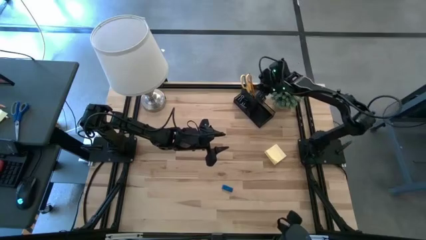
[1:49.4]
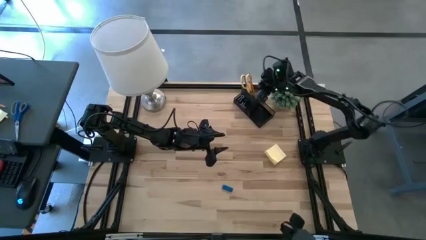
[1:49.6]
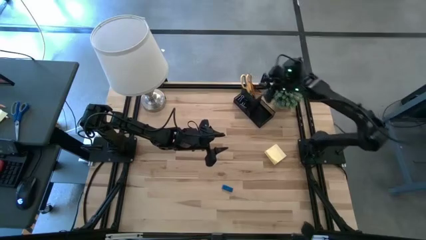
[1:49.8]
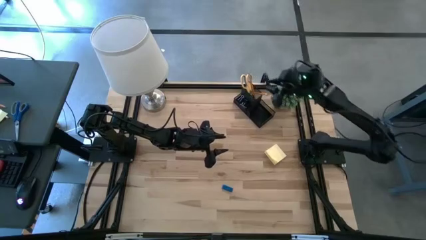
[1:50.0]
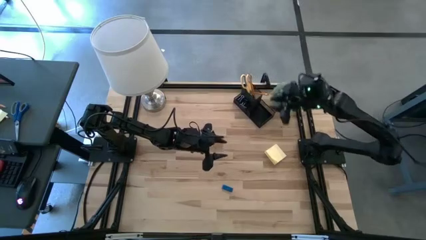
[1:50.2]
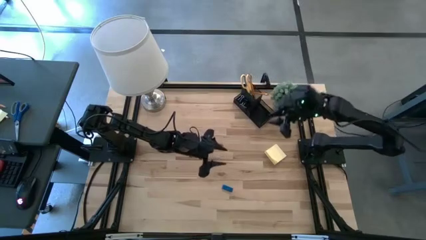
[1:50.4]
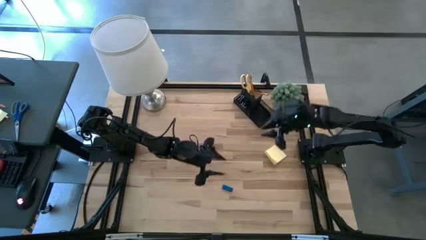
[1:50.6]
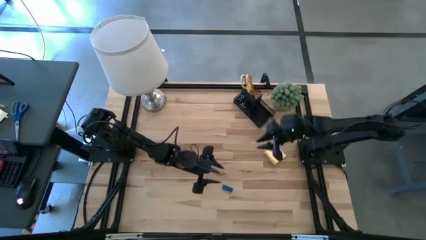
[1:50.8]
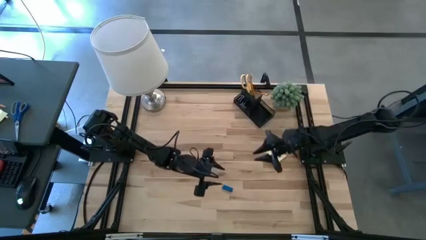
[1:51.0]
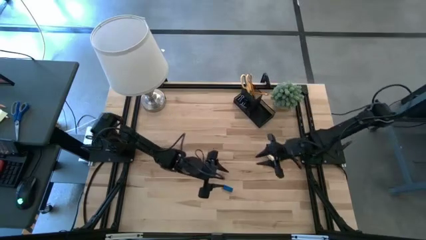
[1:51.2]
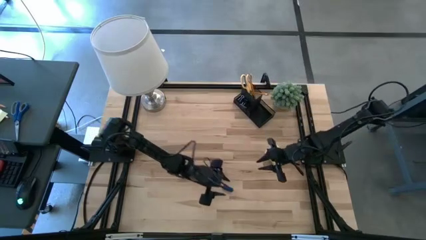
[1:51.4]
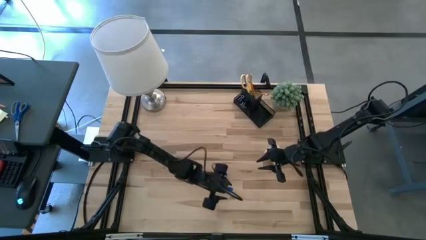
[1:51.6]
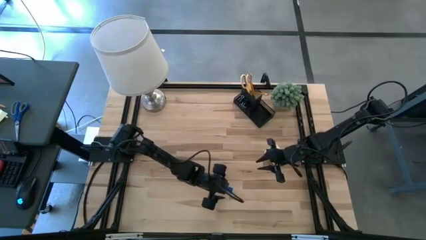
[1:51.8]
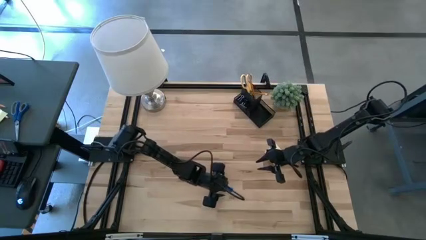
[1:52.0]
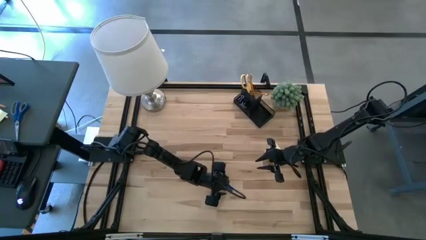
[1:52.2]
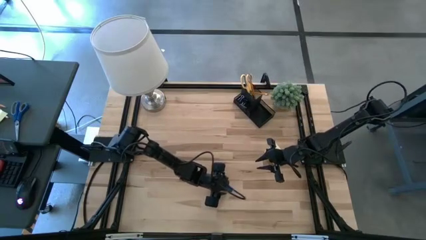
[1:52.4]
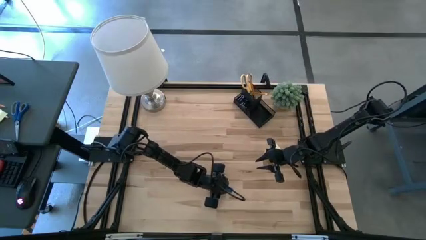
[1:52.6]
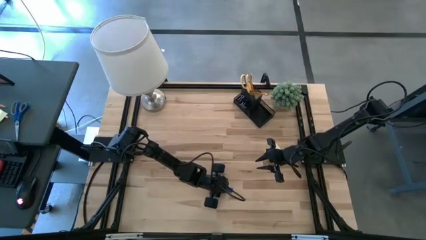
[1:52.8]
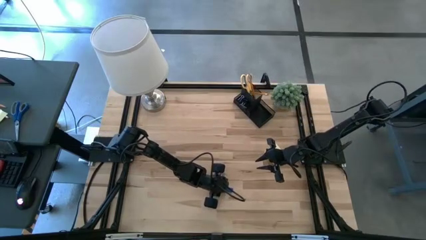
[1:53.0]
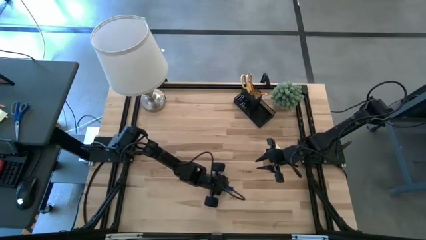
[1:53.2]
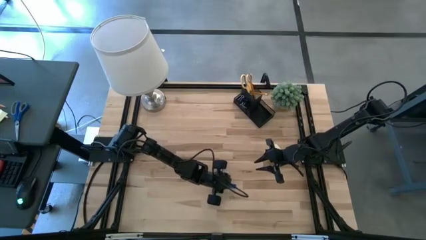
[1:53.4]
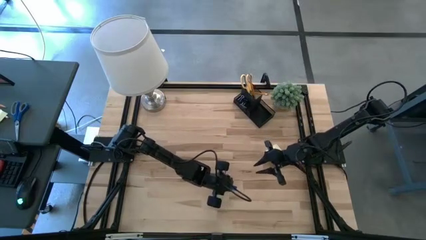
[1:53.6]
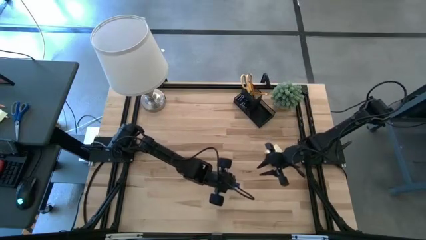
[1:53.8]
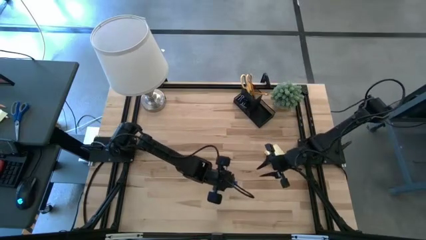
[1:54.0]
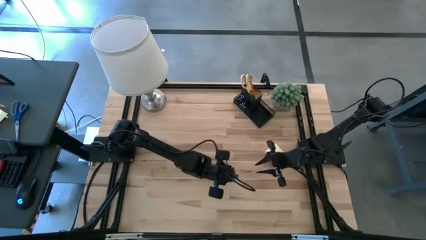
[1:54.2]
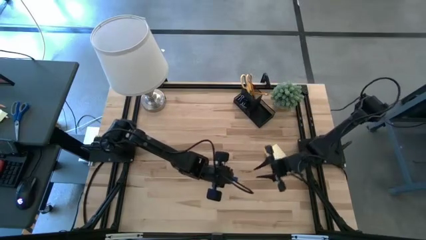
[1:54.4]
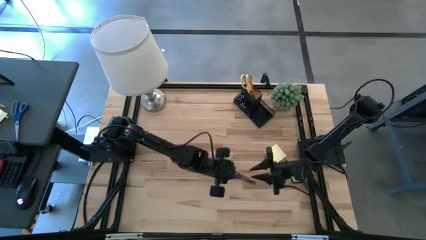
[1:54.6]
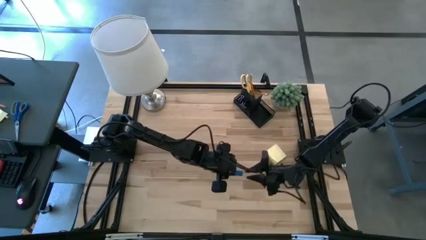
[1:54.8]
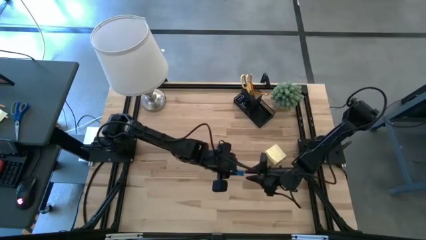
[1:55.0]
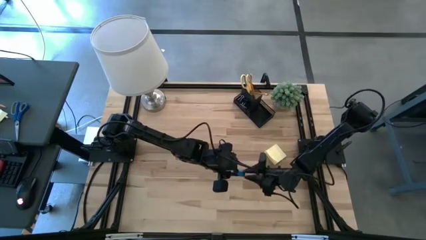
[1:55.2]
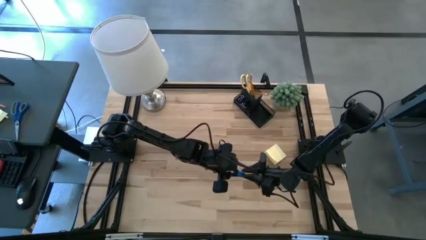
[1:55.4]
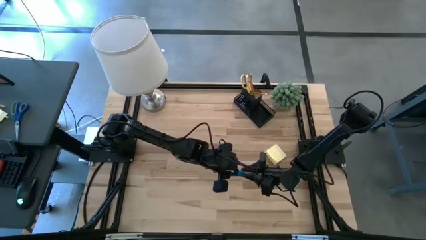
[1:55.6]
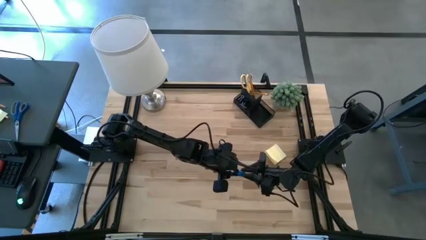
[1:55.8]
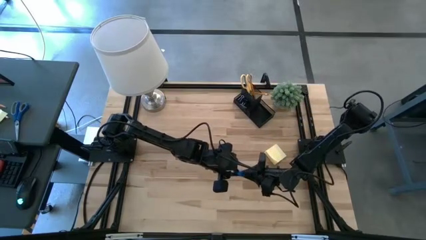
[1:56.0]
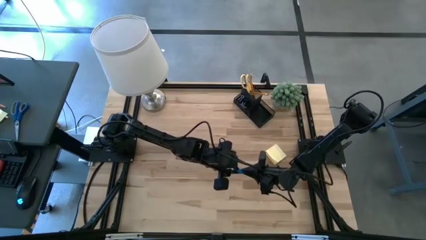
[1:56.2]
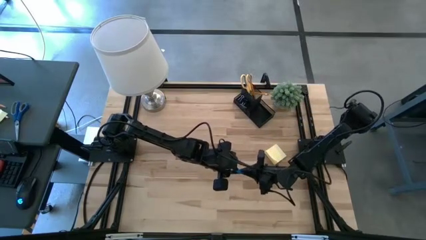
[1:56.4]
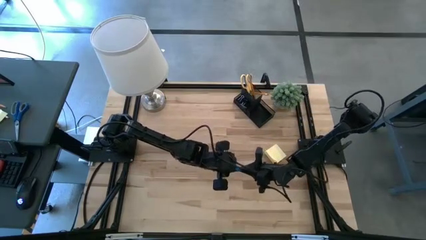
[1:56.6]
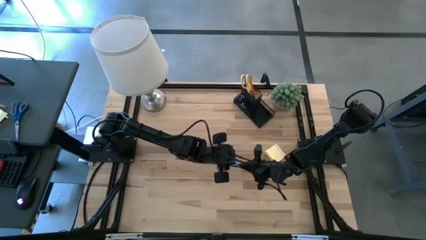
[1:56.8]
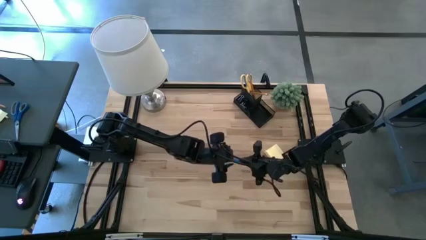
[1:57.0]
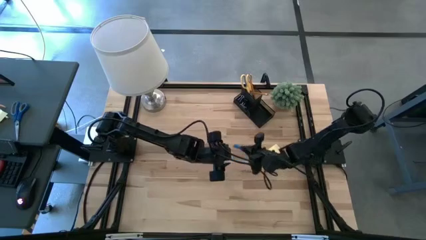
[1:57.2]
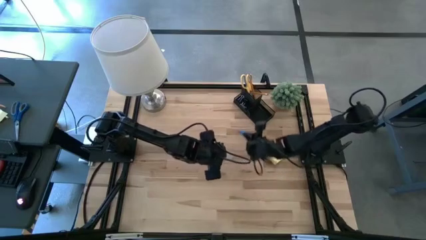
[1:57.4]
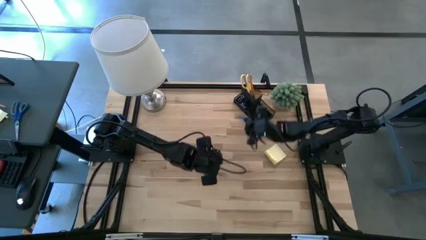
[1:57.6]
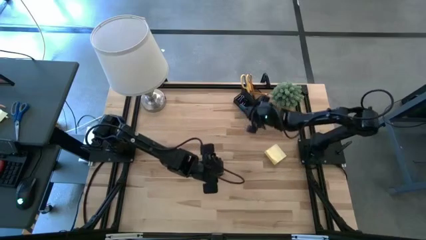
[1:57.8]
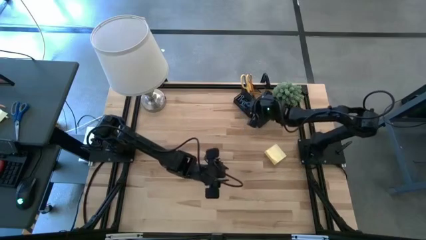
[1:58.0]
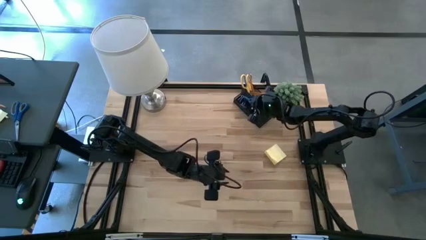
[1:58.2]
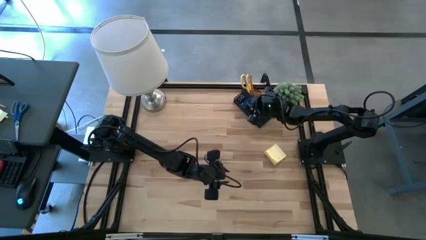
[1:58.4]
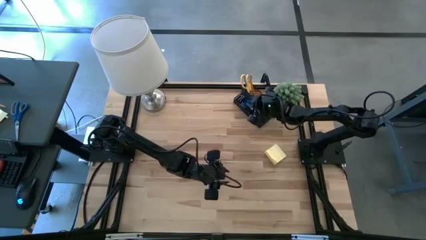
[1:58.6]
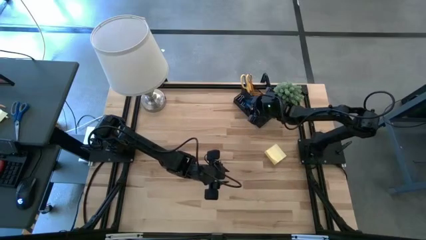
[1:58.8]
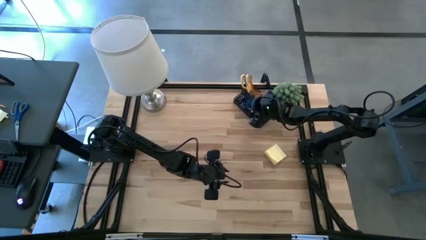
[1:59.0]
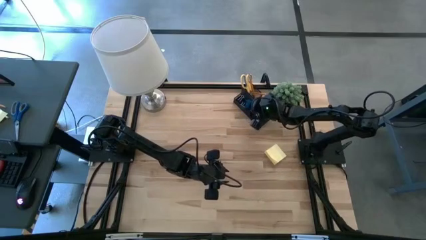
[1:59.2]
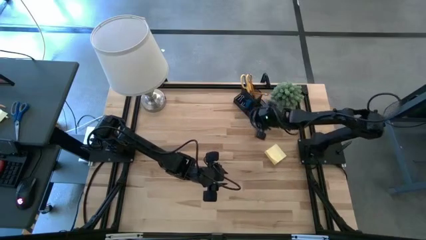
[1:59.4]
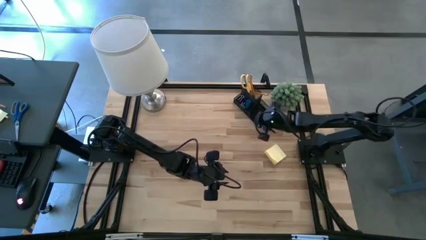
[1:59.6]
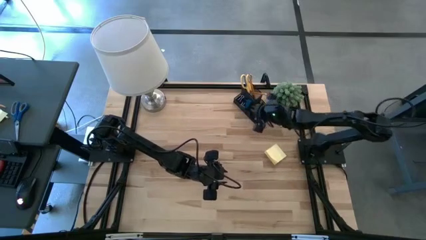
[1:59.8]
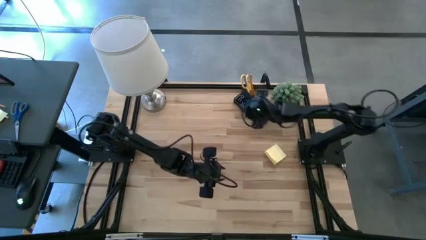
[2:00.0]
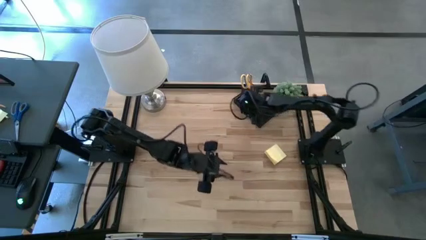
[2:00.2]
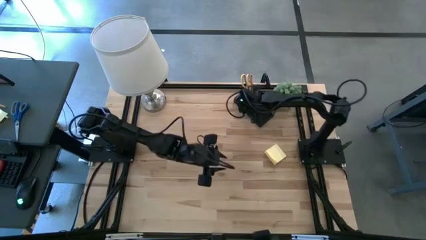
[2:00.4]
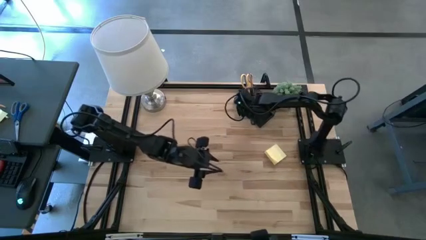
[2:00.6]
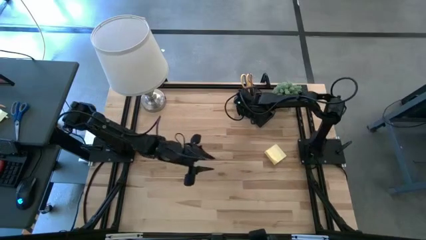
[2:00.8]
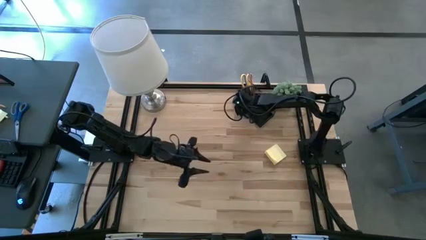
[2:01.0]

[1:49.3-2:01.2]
Task: Pick and place office supplies into organizer
Put the blue eraser into the desk organizer

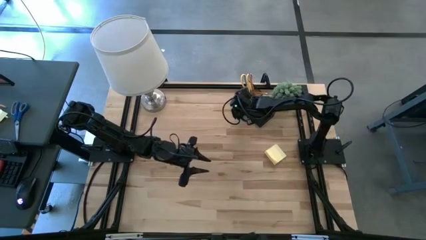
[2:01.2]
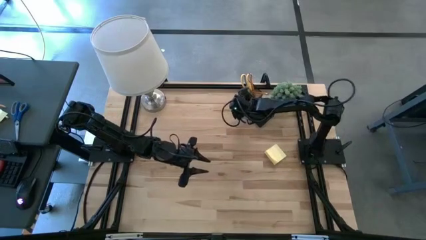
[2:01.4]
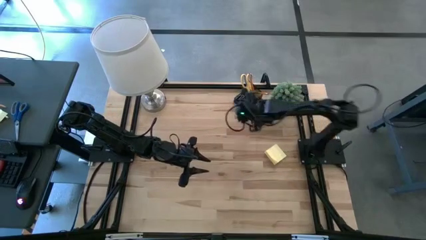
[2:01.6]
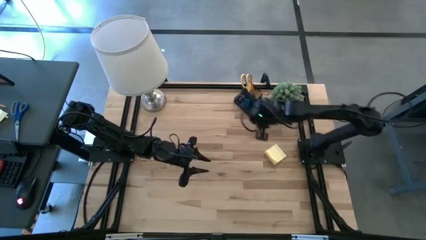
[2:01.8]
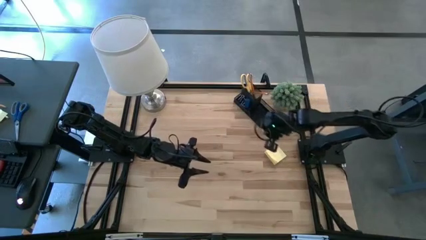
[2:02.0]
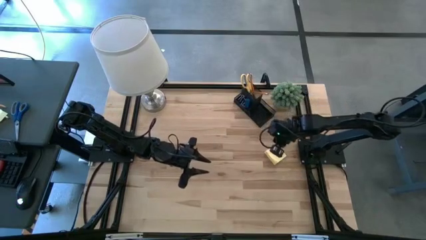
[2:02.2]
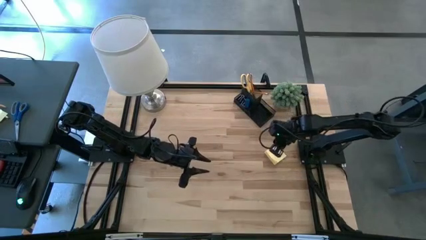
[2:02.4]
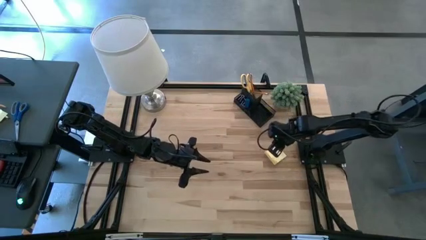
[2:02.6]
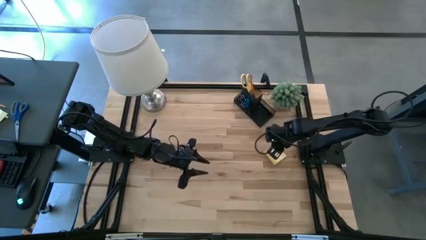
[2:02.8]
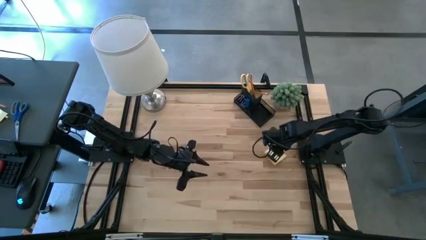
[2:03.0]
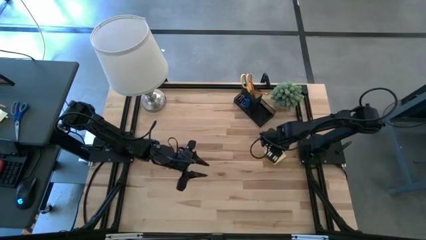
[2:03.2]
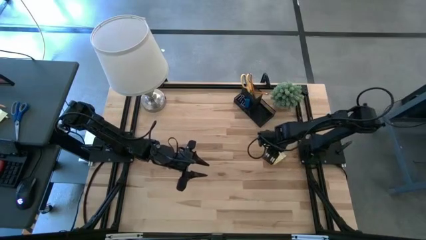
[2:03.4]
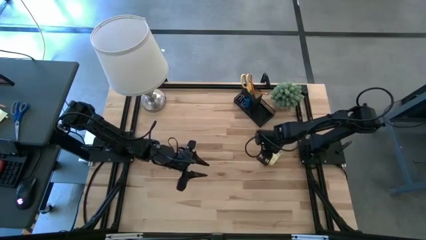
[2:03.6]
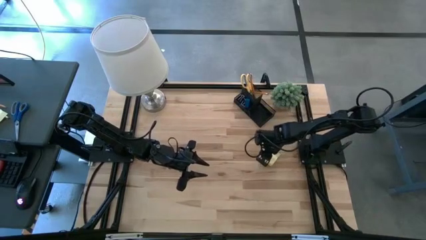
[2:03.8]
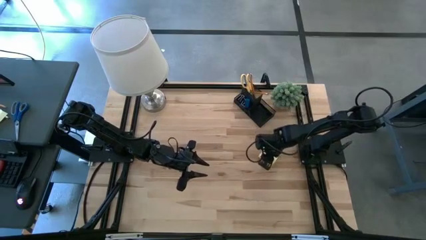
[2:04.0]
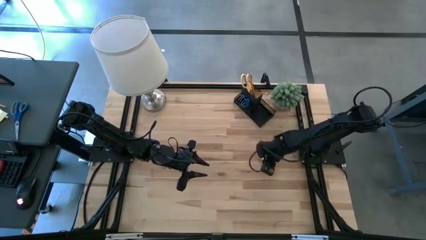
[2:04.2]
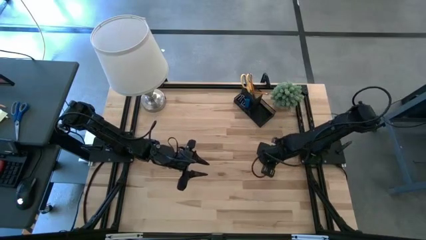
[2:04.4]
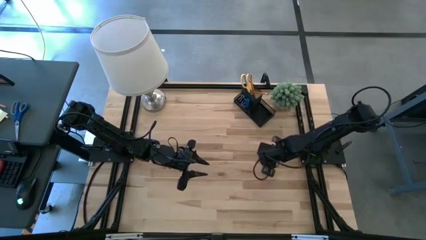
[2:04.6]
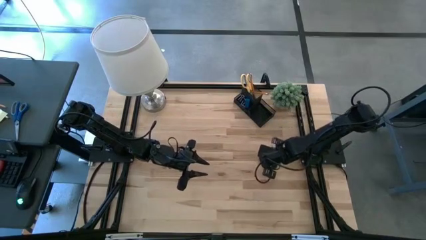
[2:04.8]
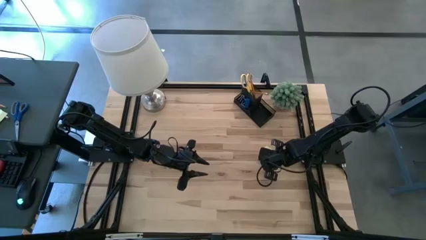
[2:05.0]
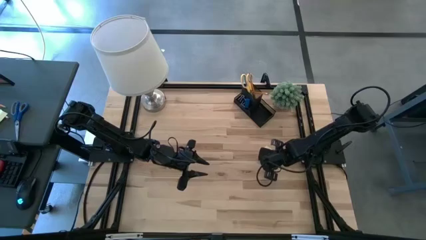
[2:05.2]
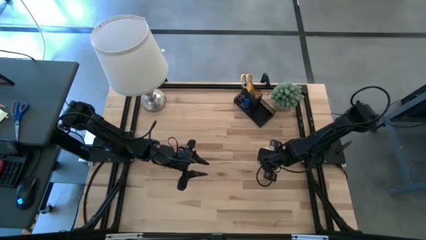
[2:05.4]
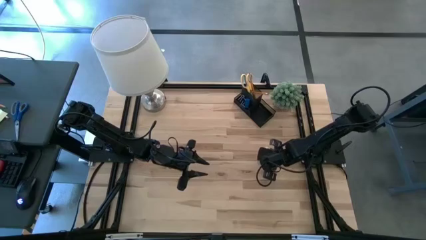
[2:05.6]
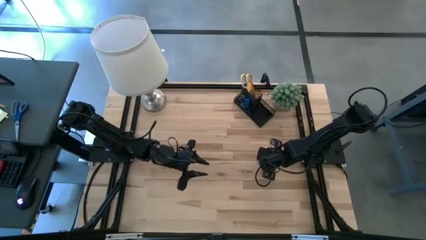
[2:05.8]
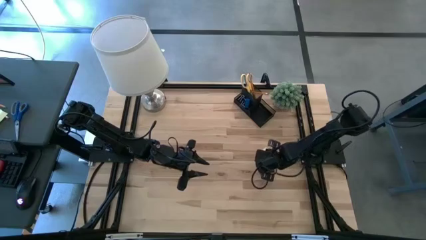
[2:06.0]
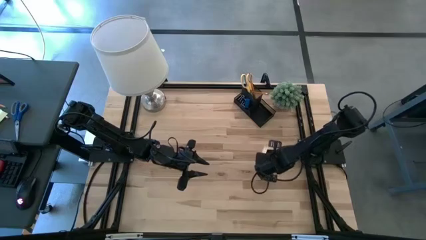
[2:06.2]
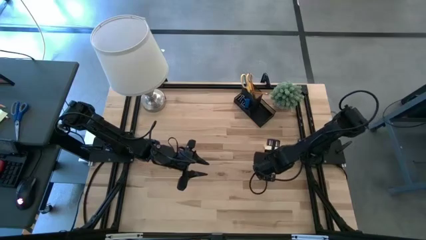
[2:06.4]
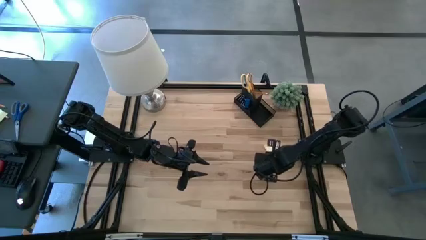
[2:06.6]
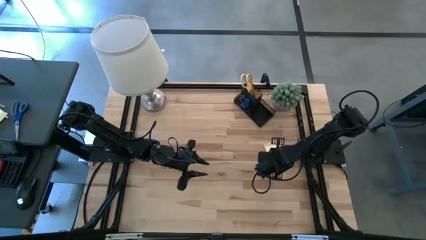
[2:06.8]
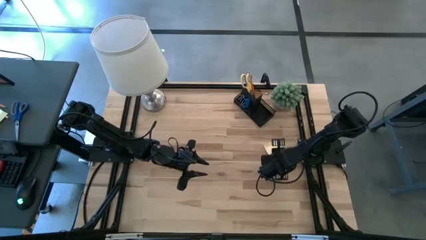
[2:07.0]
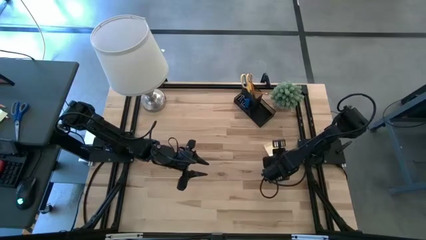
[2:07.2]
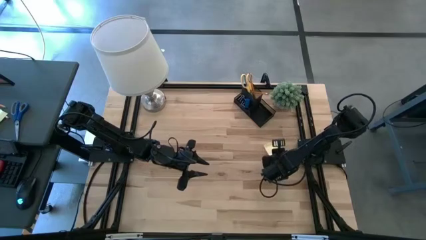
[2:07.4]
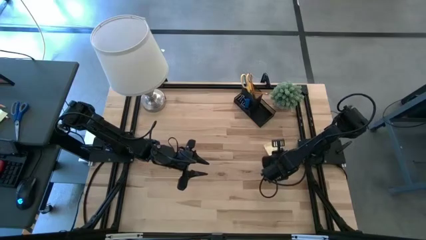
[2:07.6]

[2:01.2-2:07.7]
Put the yellow sticky note into the desk organizer
